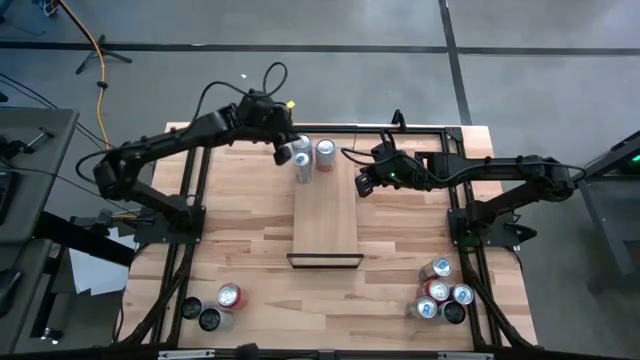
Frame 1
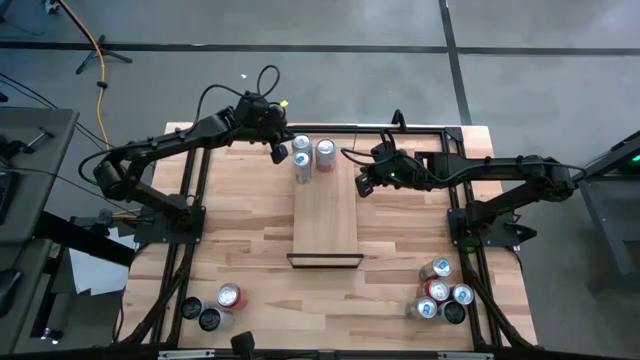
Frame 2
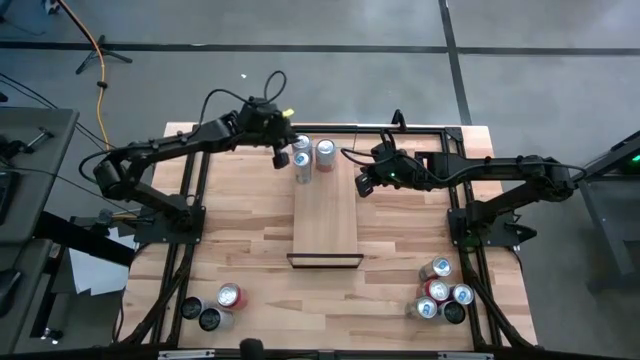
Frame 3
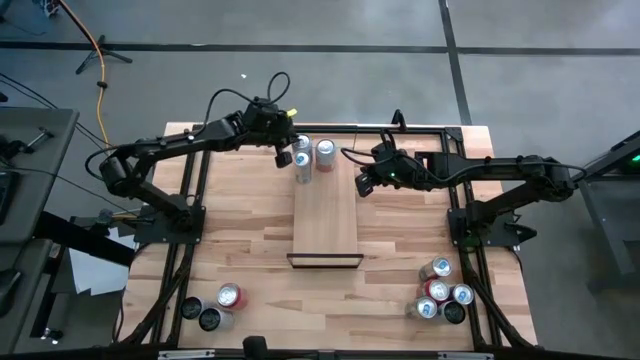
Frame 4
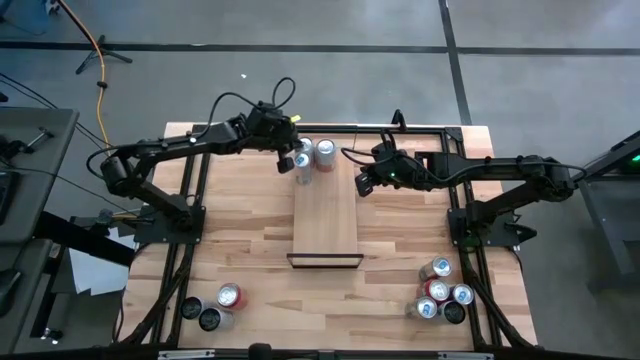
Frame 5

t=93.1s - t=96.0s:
Task: Place canned beverage on shelf
Adjust the pink white soda can on the shelf

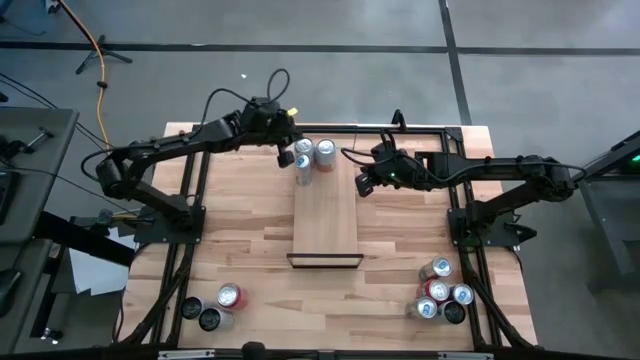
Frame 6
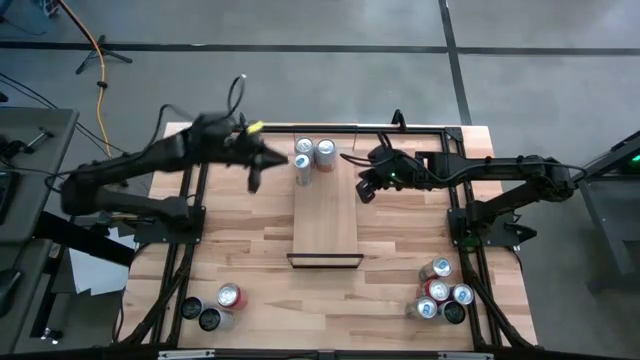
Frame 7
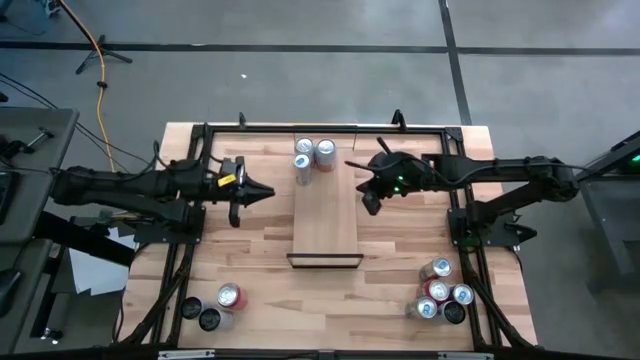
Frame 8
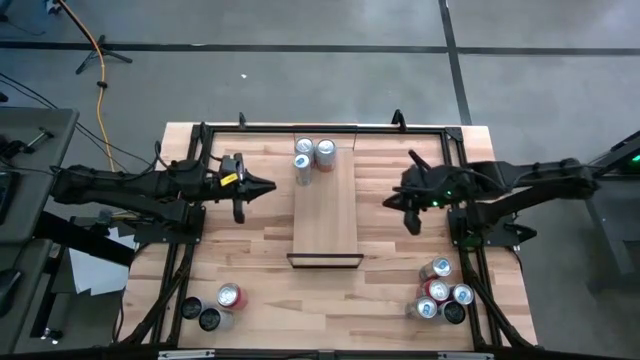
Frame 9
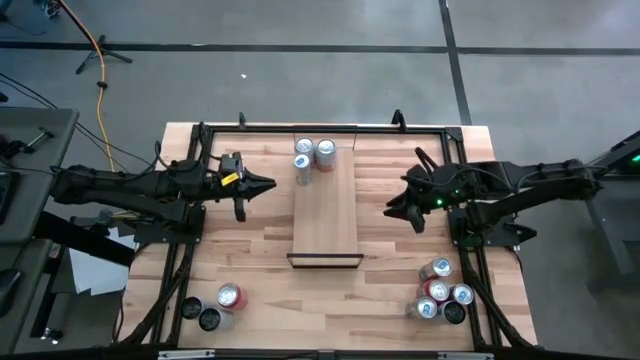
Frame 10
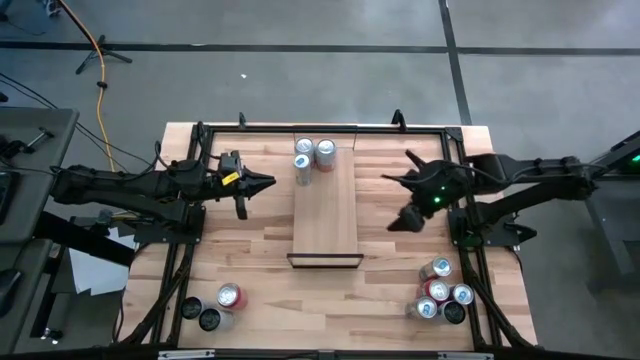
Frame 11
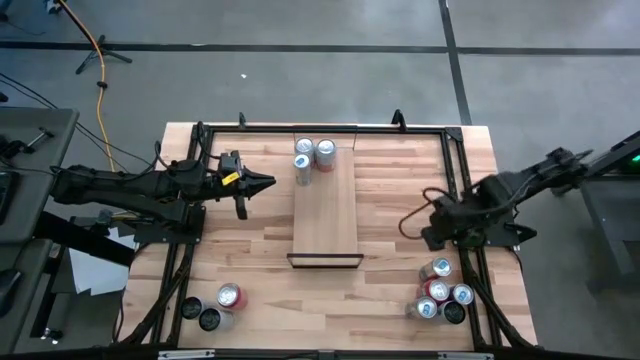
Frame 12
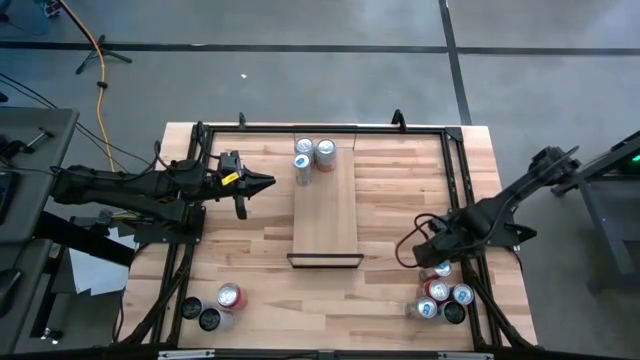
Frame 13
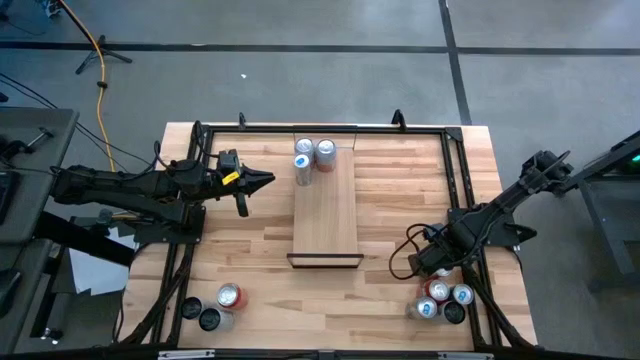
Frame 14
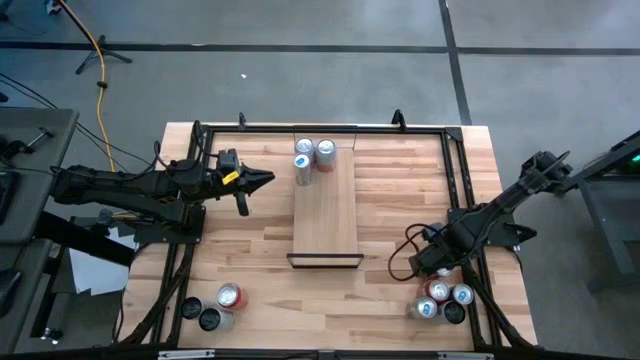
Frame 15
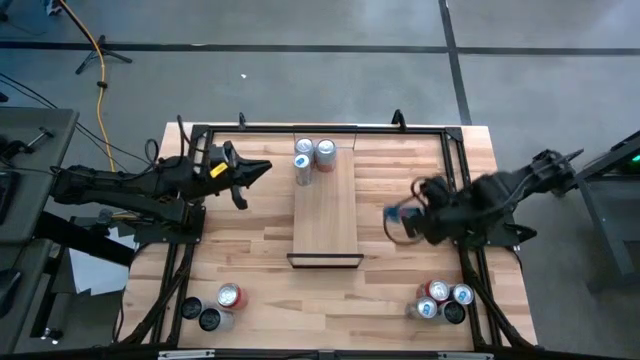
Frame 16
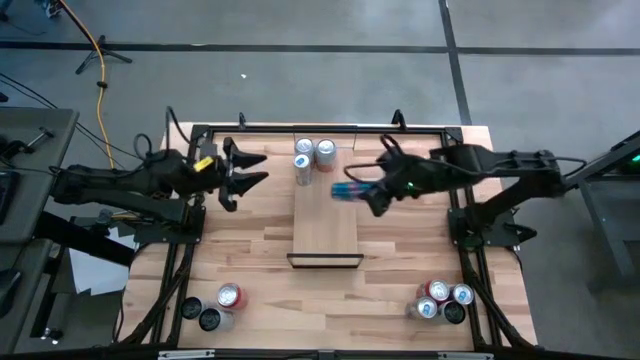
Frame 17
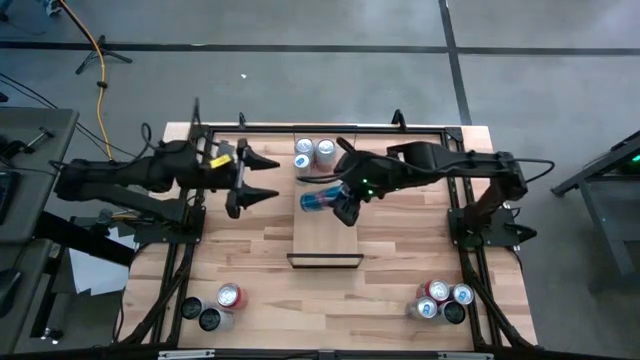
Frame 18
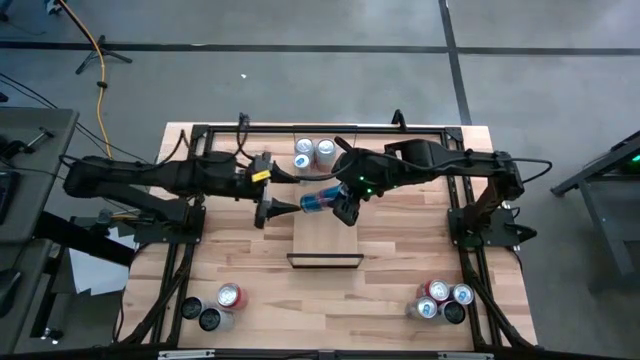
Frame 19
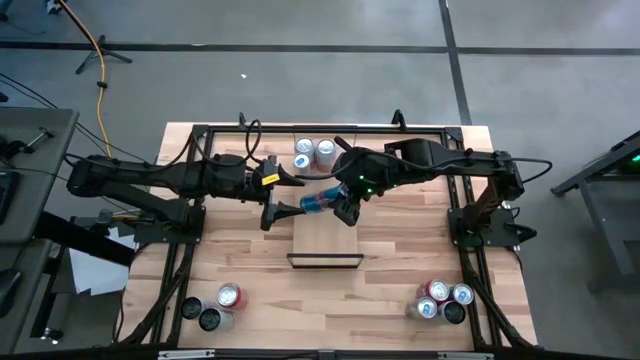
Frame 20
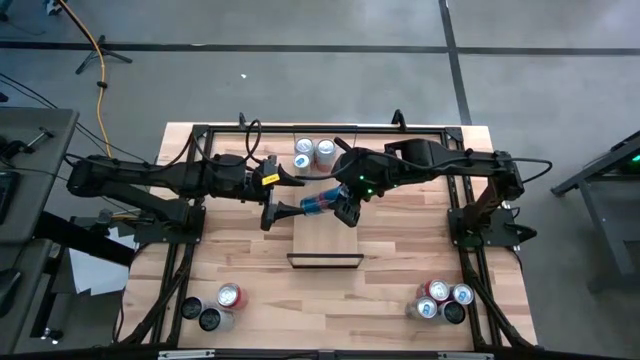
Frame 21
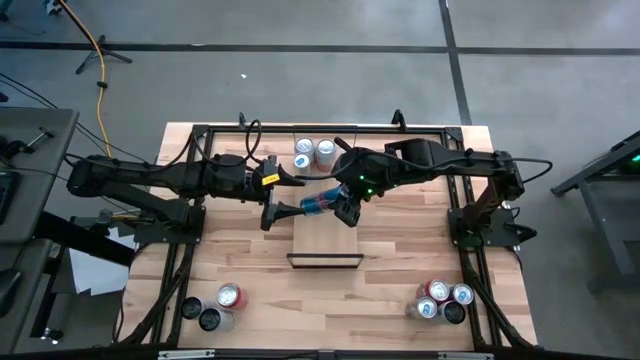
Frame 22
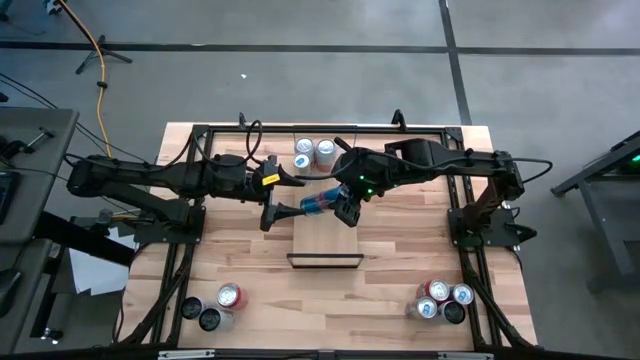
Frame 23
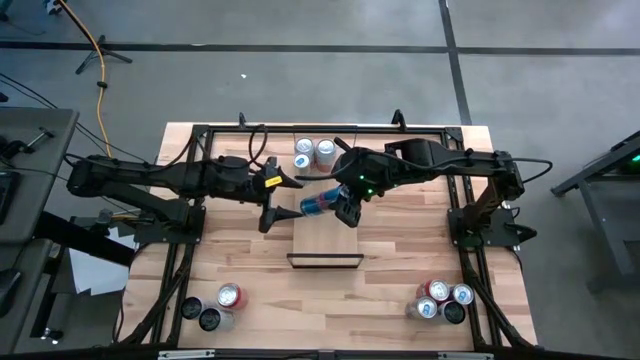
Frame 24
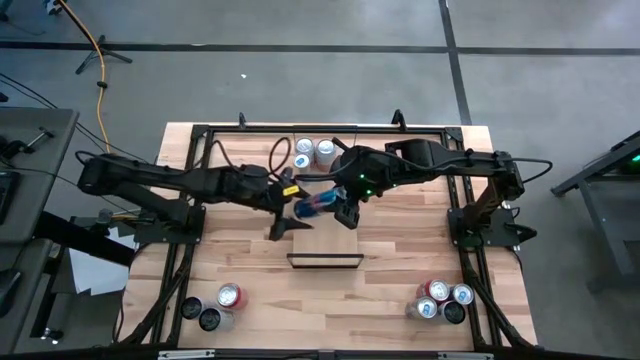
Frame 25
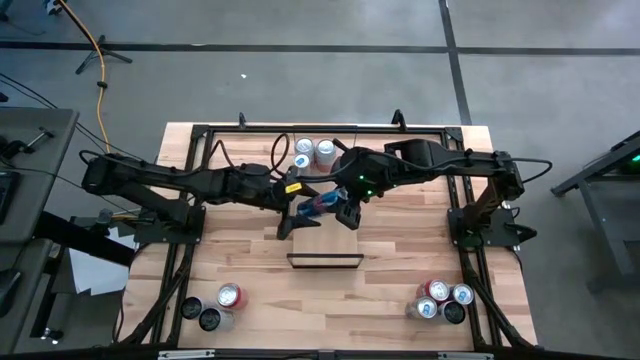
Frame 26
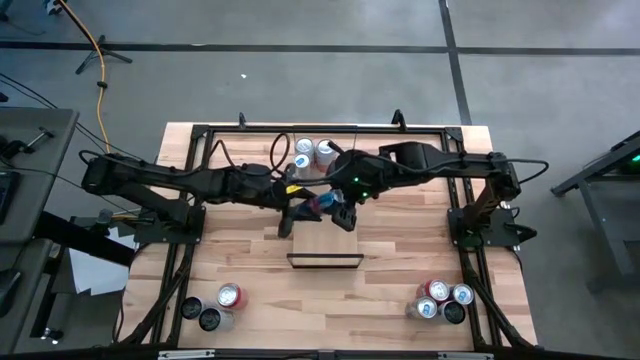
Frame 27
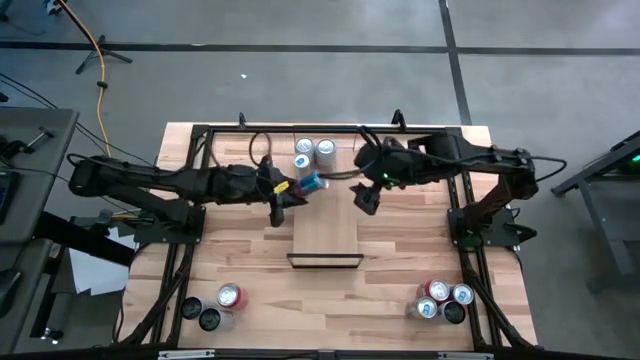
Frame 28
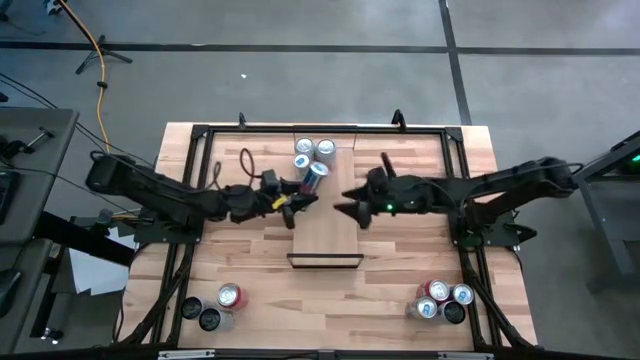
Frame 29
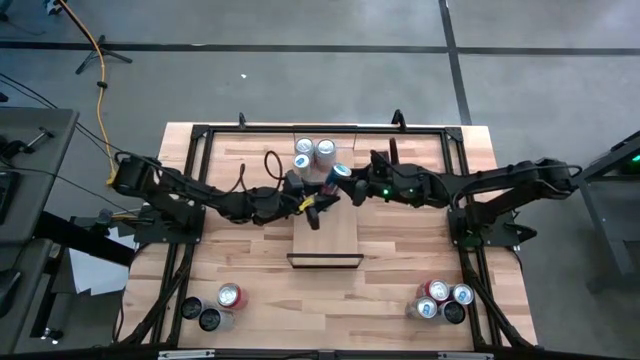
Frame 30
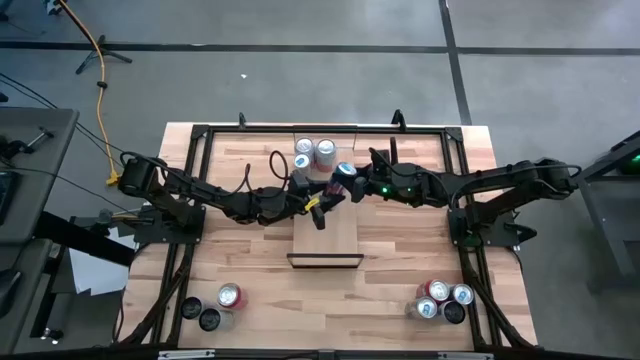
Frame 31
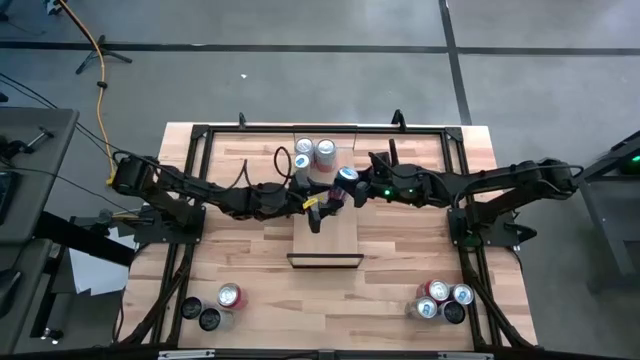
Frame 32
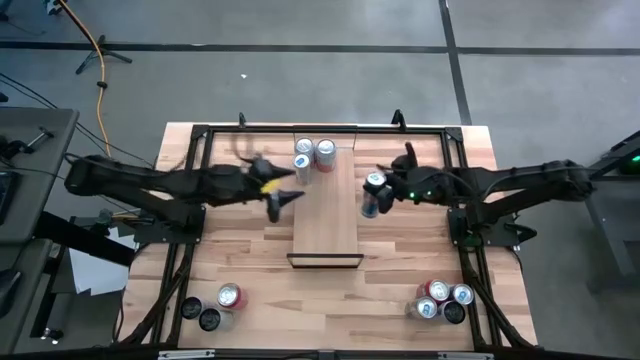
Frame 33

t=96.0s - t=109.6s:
Put the blue soda can on the shelf aligned with the other blue soda can

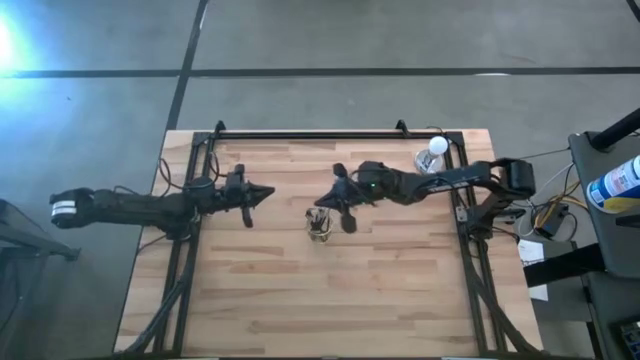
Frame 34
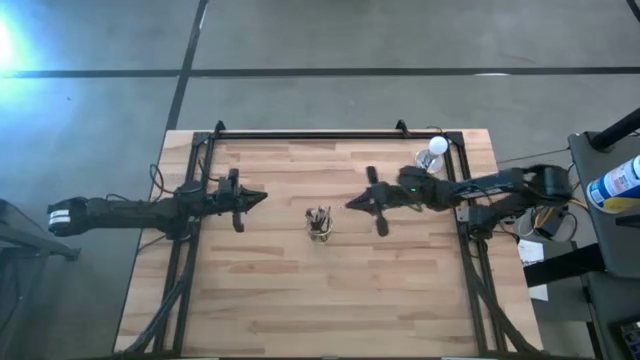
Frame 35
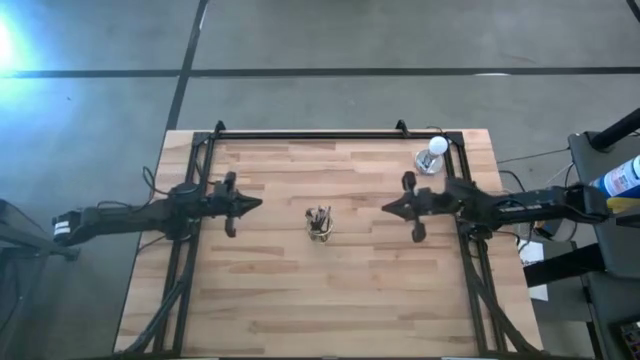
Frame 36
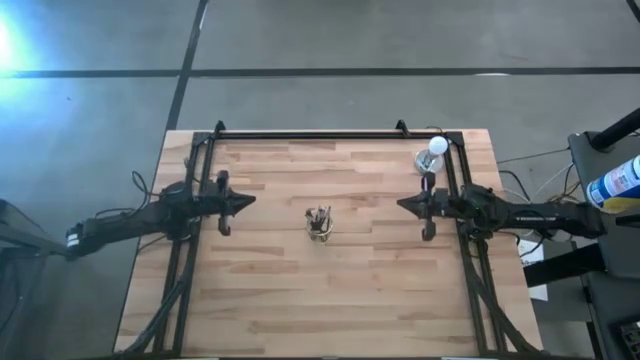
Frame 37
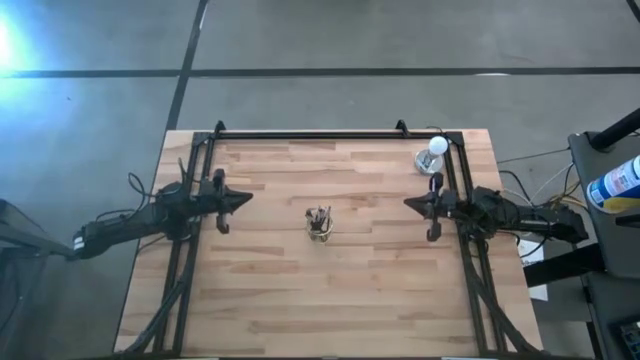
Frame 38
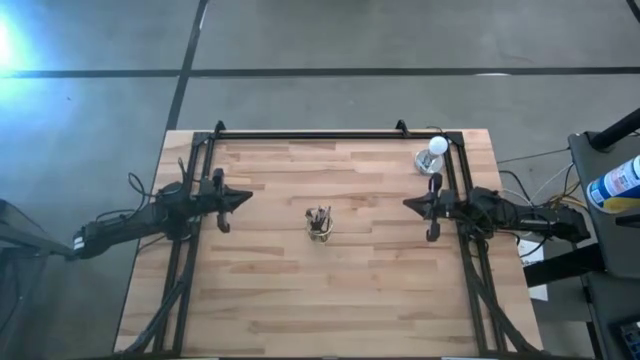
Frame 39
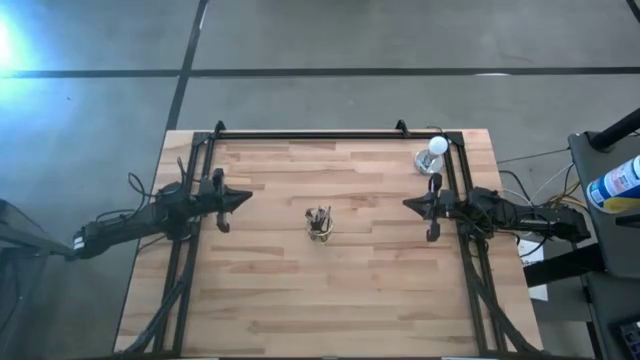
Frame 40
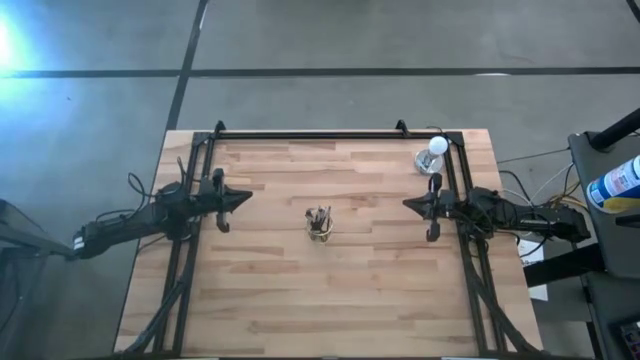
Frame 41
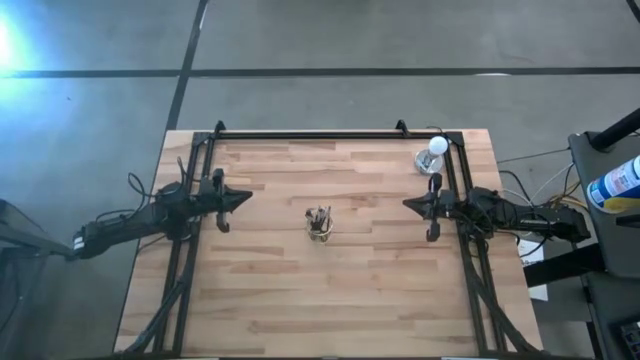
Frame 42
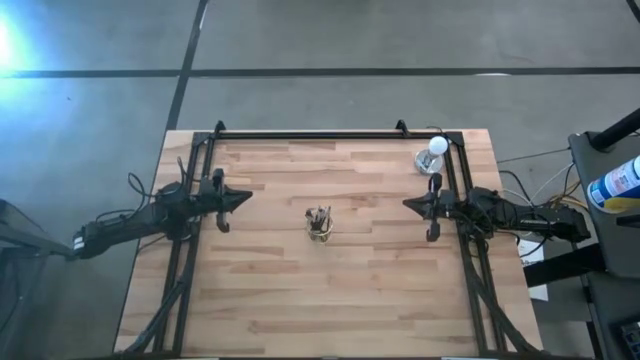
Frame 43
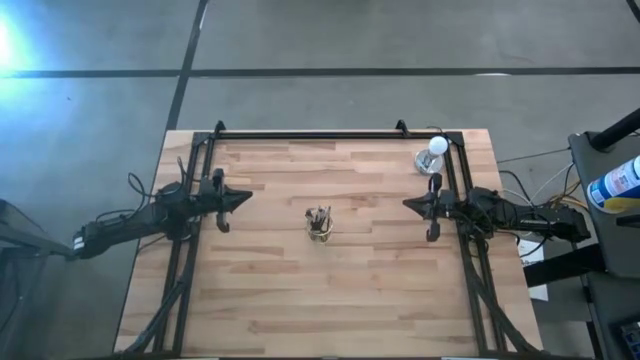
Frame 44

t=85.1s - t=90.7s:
Task: Pick & Place Makeup Brushes
Return to Home Position
